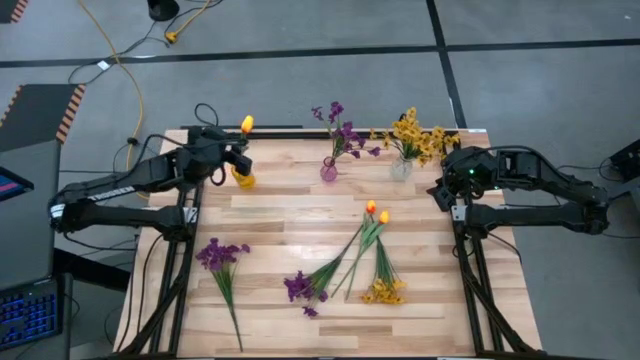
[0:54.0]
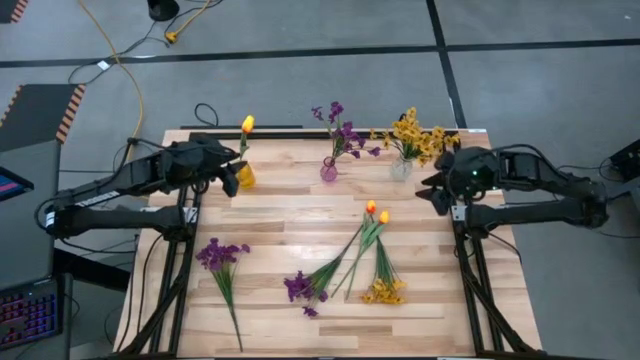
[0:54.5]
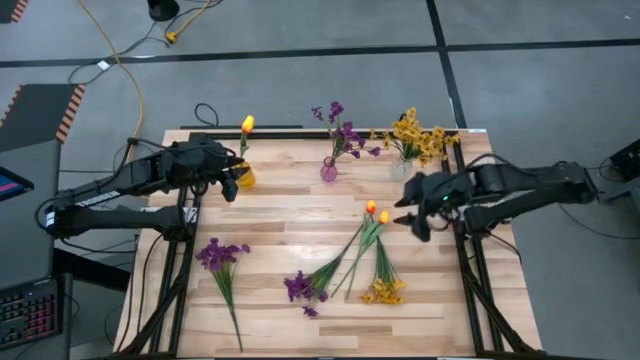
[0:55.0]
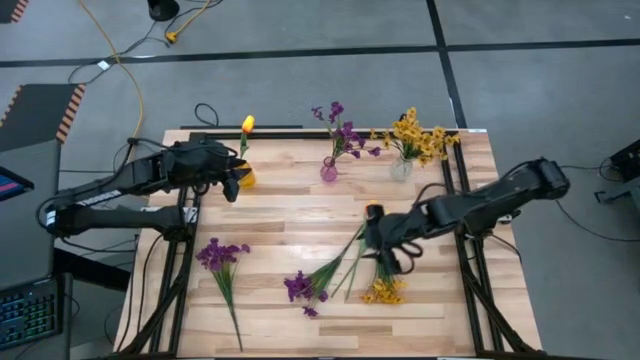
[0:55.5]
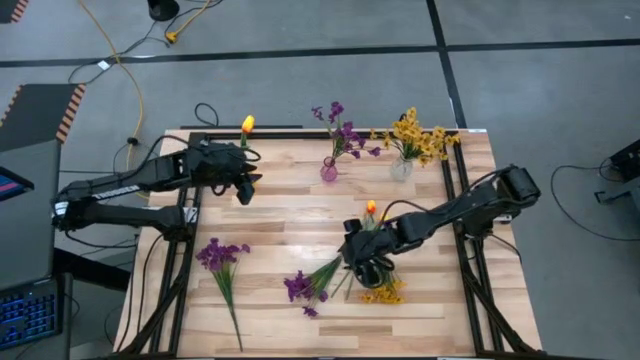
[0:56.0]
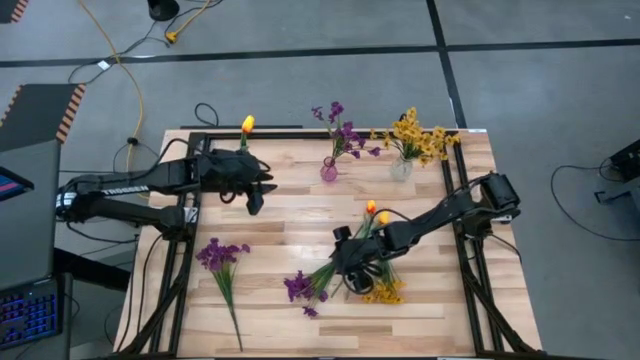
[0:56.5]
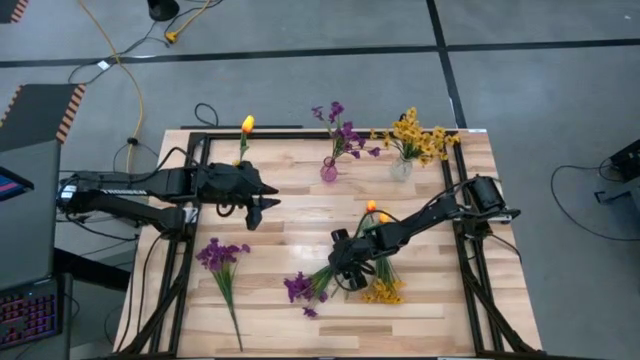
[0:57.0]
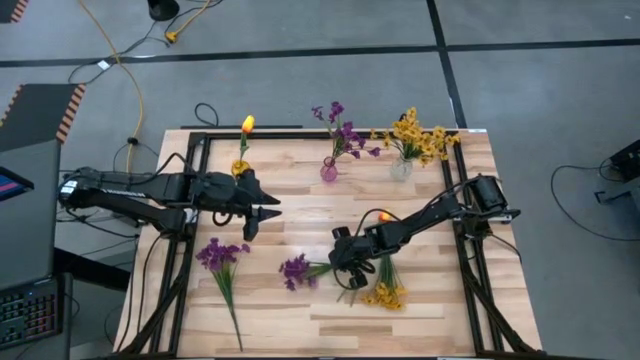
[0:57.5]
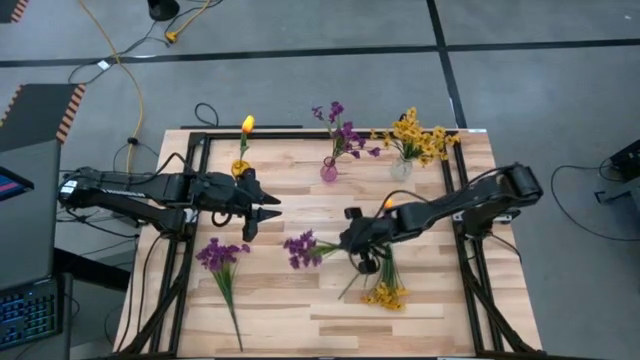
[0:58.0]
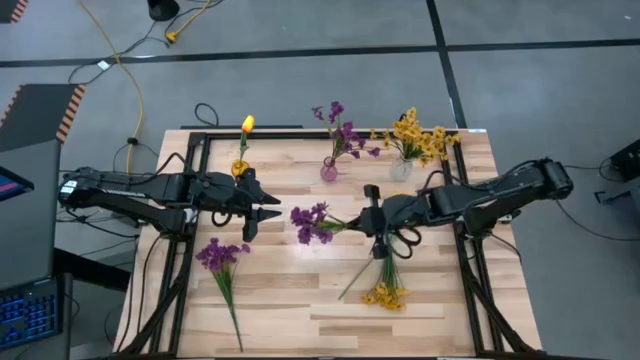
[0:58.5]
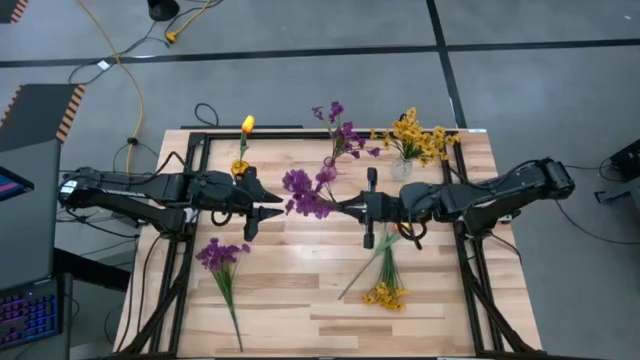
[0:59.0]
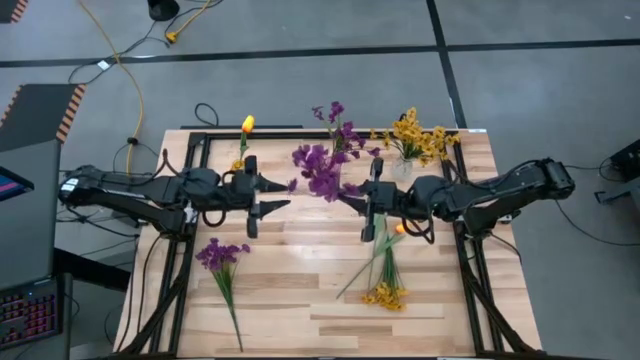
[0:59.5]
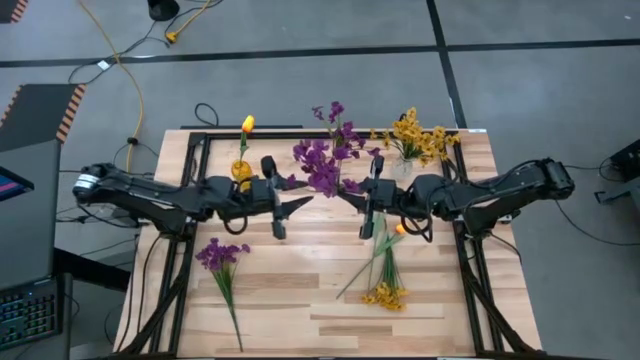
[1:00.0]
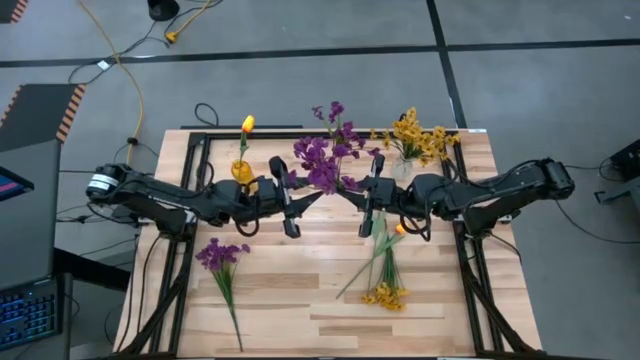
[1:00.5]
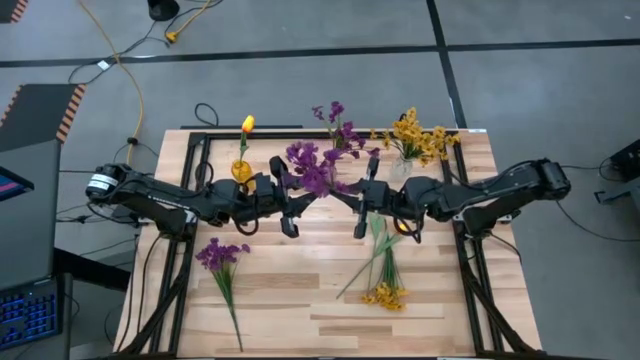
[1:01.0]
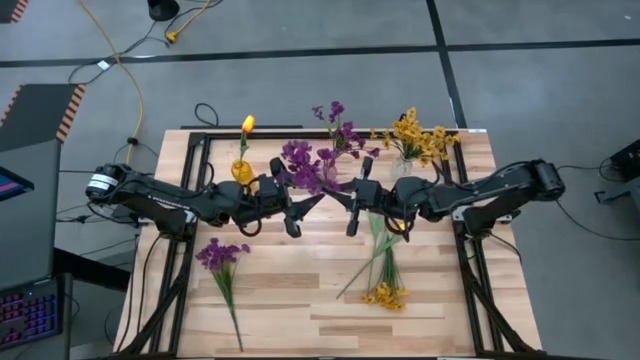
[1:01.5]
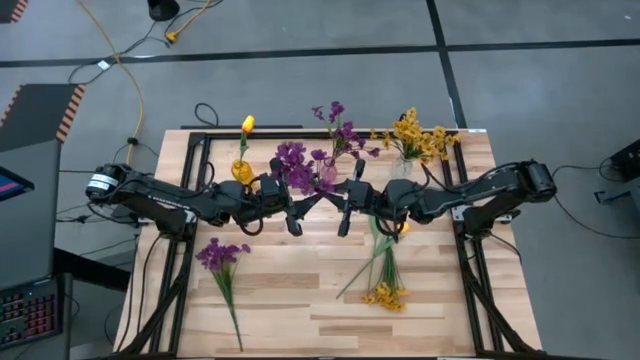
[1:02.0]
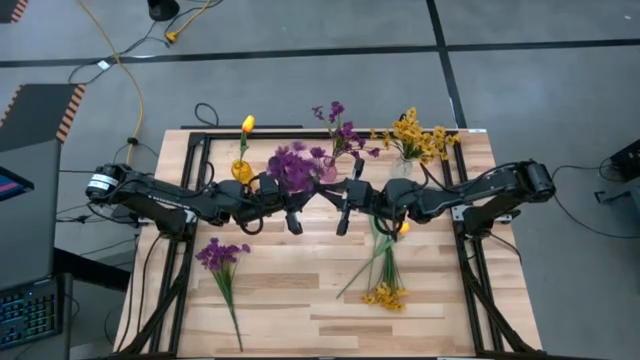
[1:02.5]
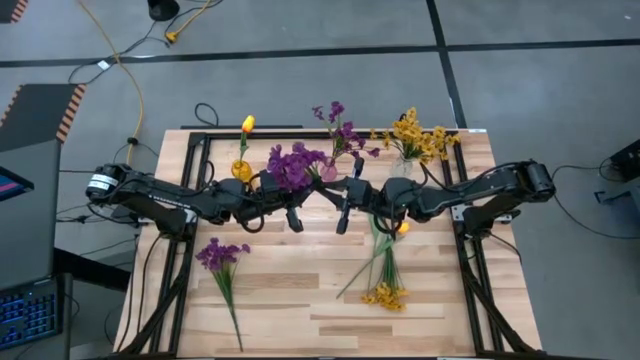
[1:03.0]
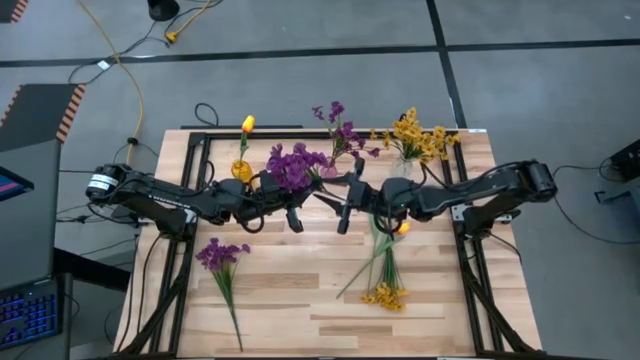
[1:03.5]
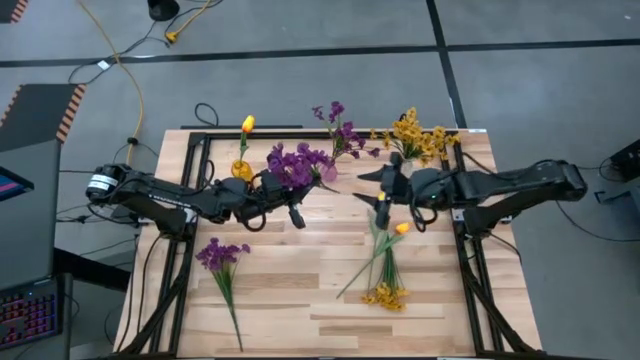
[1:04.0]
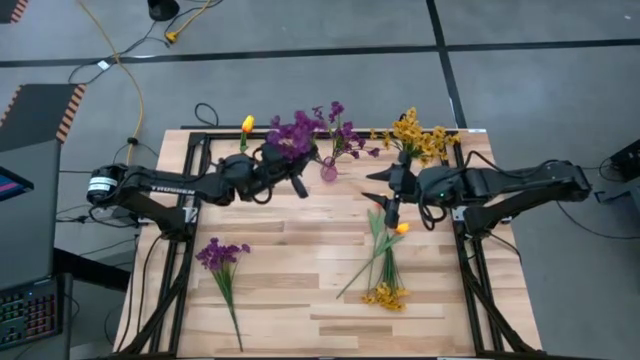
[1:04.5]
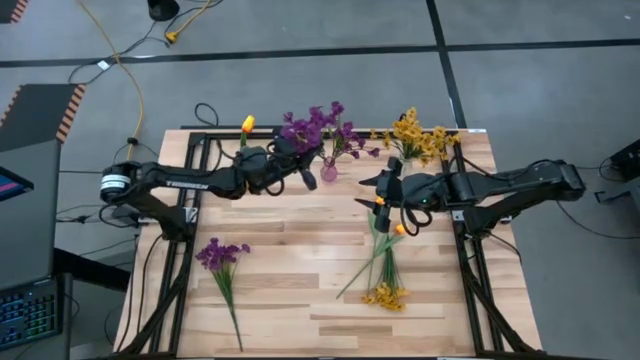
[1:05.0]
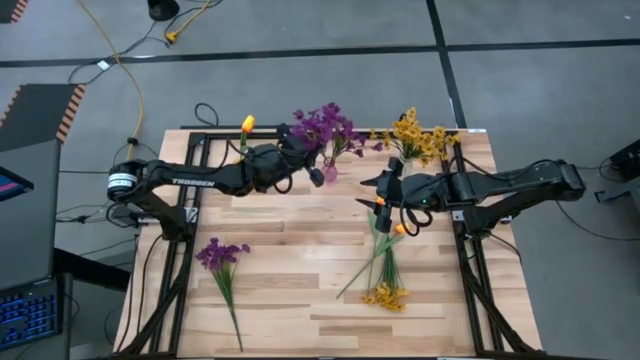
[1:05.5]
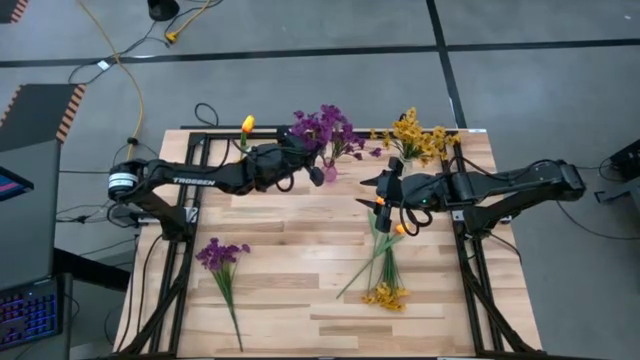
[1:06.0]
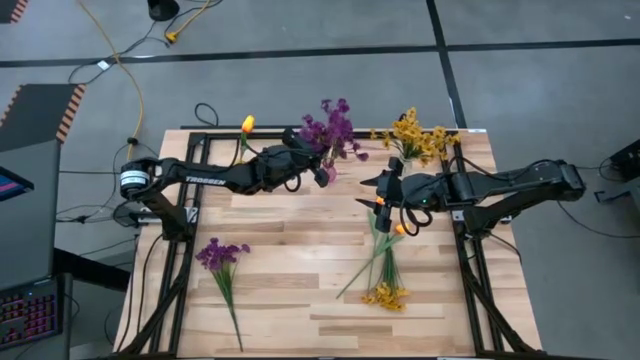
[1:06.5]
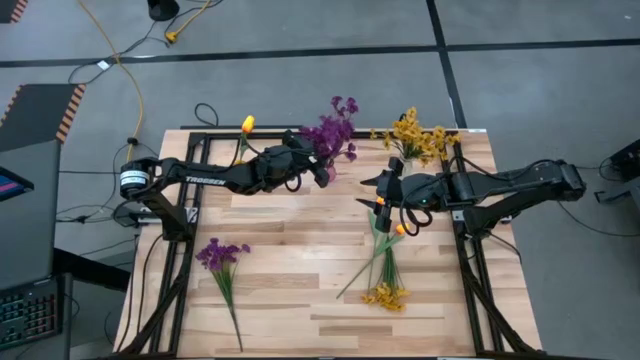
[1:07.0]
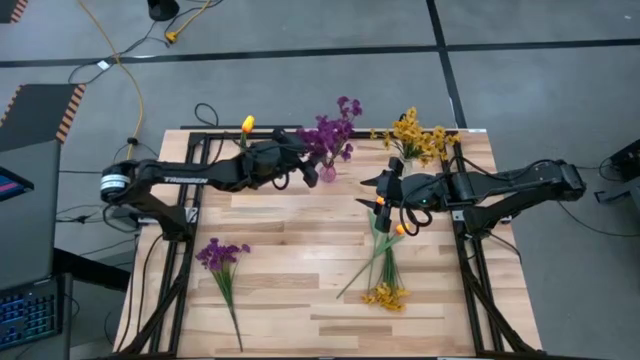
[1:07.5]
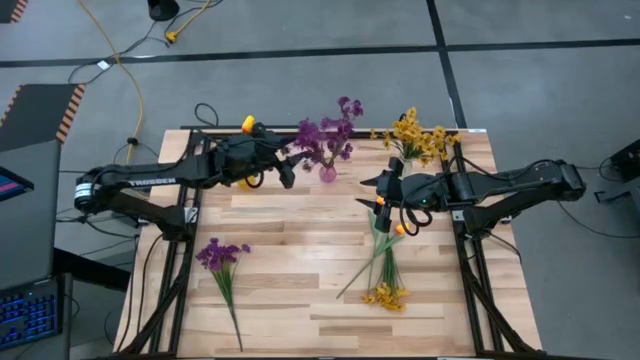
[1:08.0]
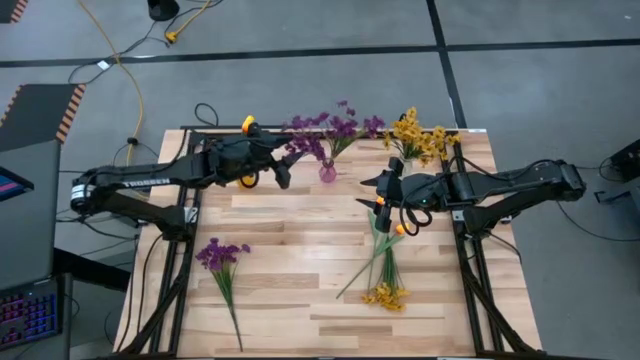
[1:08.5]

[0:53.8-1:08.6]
Task: Sort flowers into vase by color
Put the right violet flowers into the violet vase

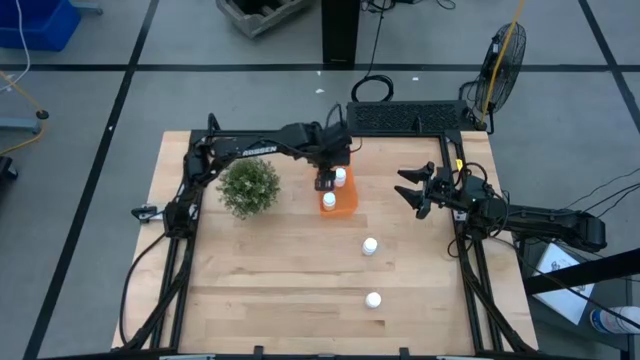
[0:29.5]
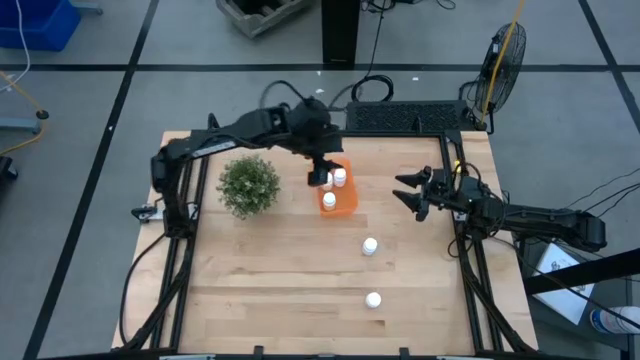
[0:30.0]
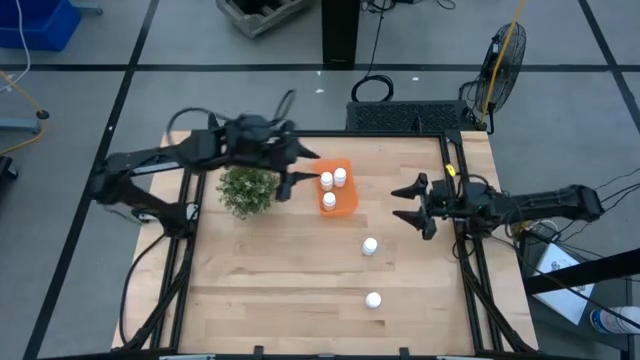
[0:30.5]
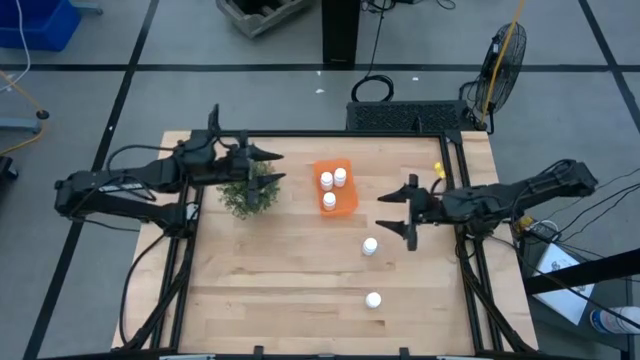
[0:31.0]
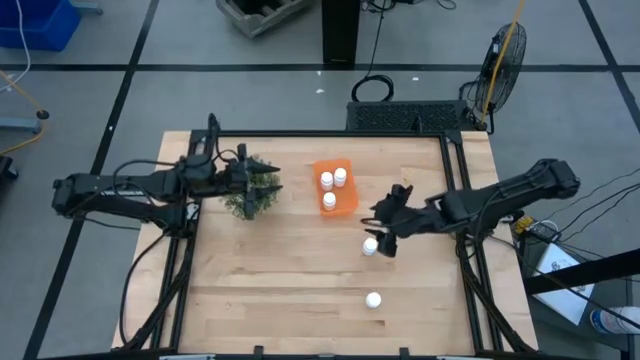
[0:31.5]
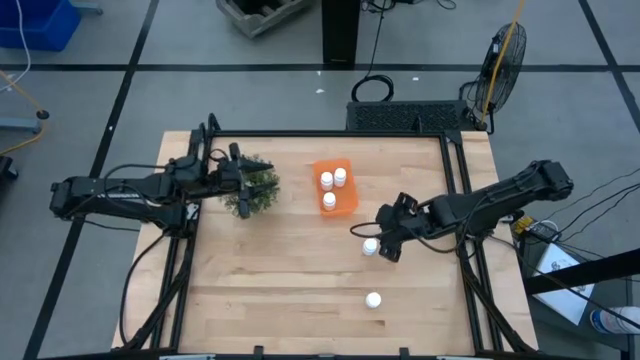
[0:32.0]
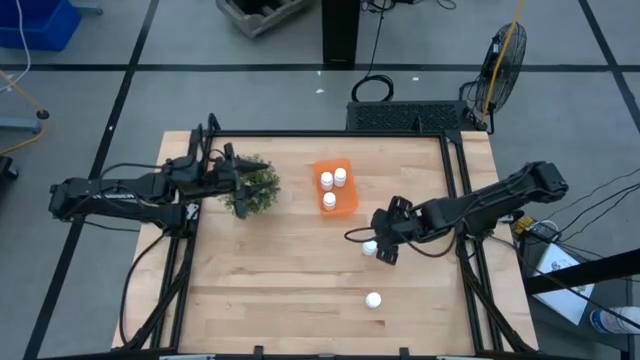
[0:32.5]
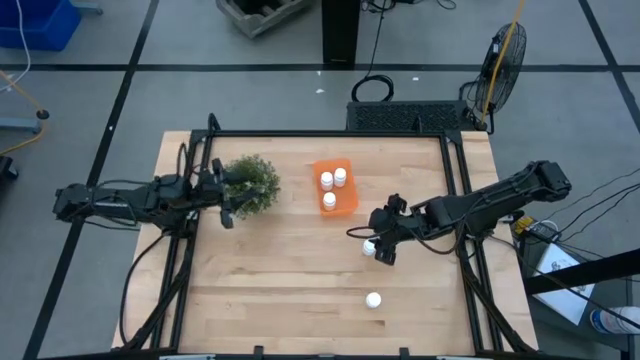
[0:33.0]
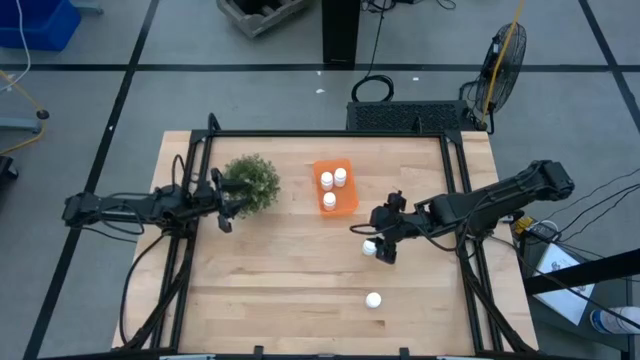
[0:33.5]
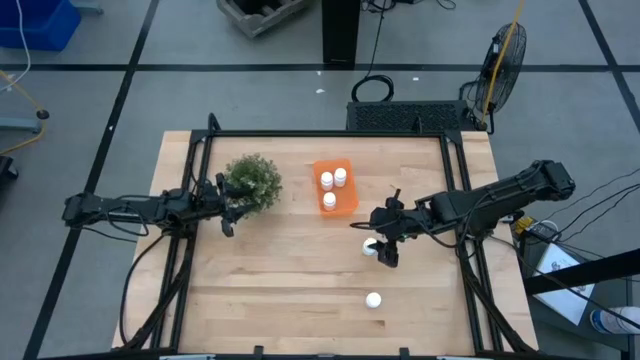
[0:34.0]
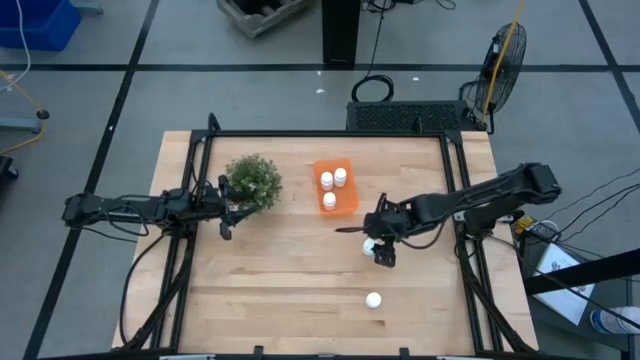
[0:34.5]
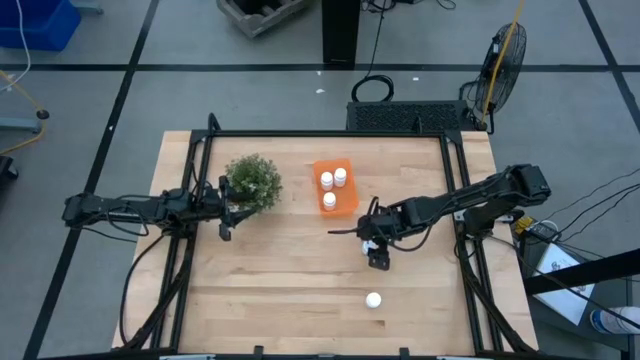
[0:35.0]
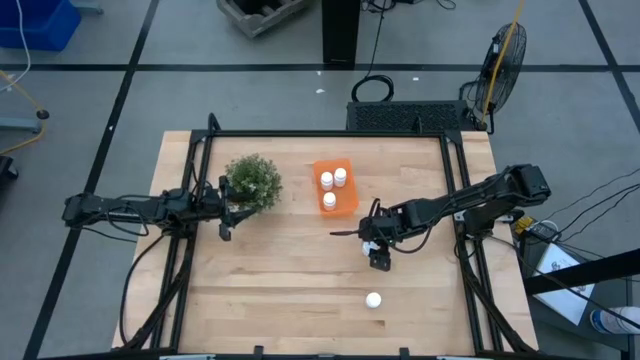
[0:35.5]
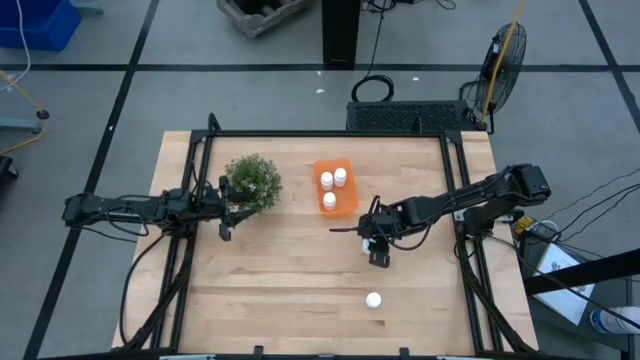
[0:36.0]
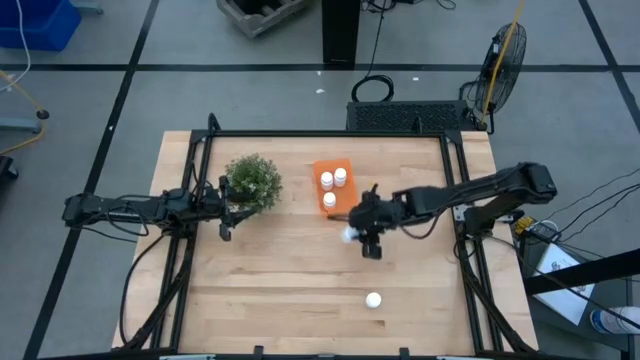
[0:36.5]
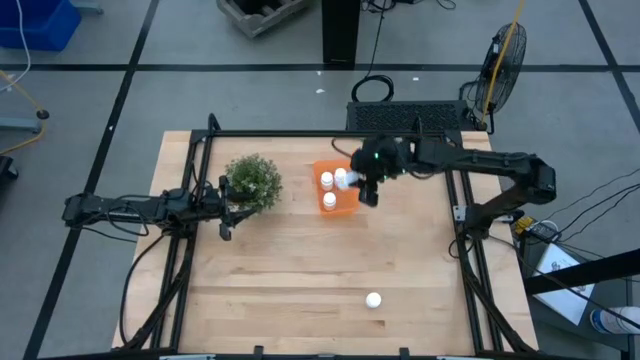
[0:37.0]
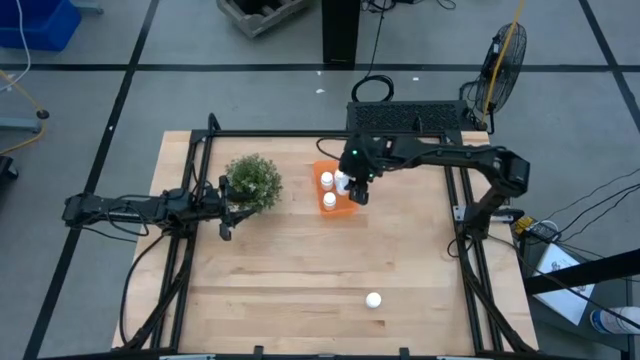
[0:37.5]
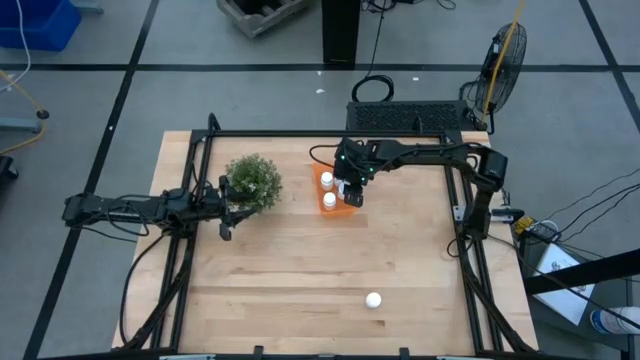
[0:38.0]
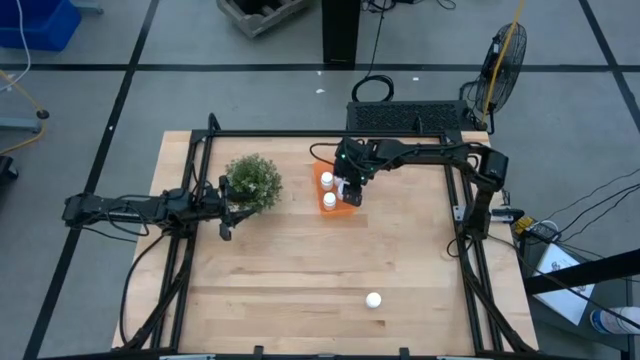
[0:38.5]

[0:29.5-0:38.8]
Task: Pick and place pill bottles into a basket
Put the white pill bottle into the orange bin
